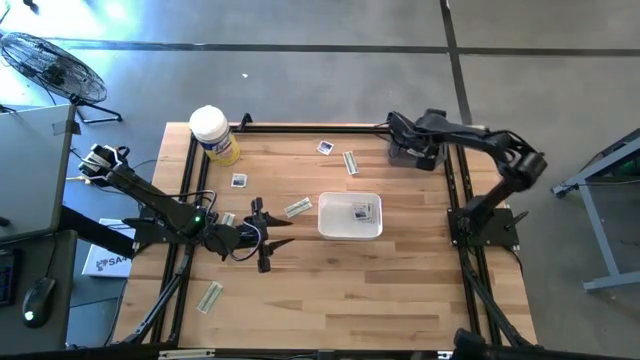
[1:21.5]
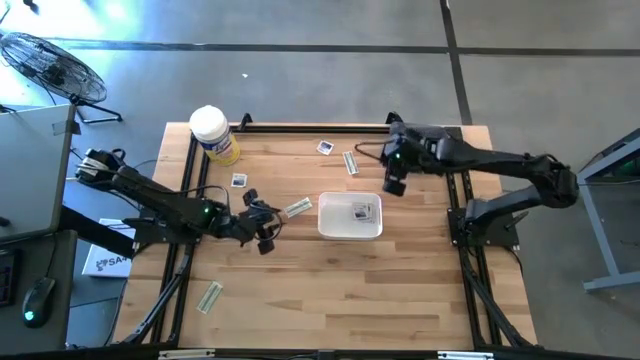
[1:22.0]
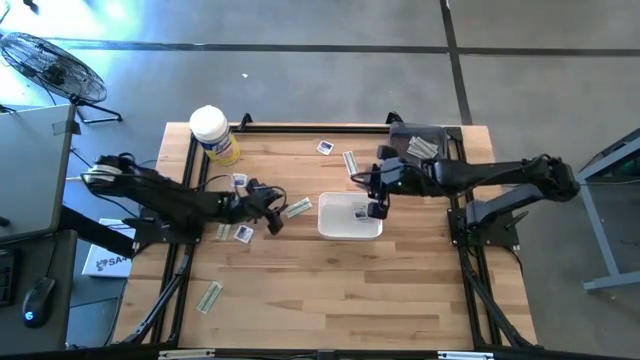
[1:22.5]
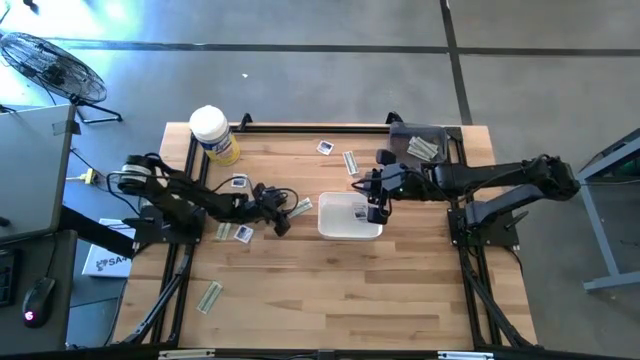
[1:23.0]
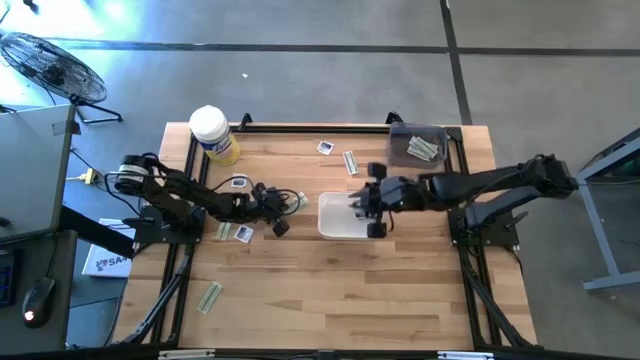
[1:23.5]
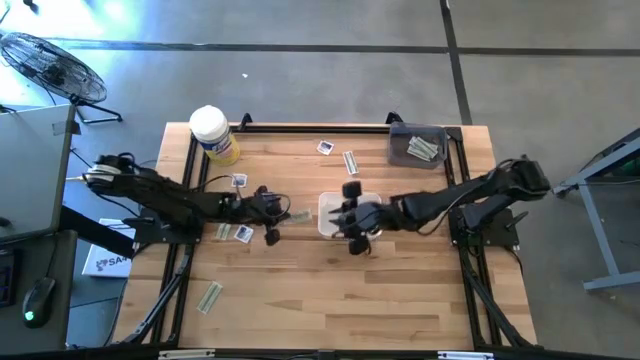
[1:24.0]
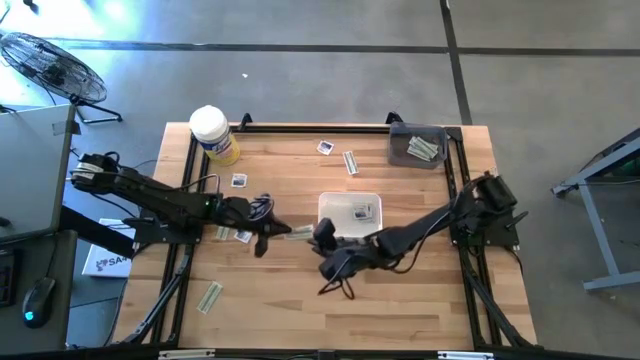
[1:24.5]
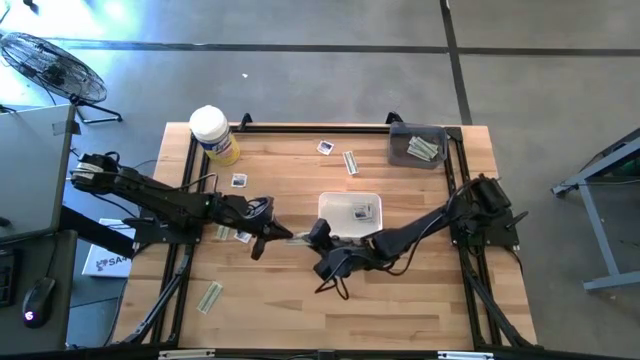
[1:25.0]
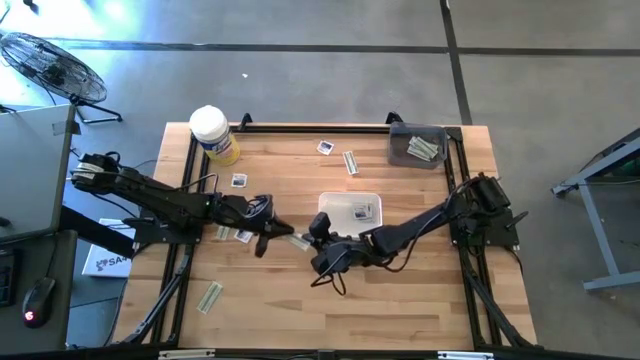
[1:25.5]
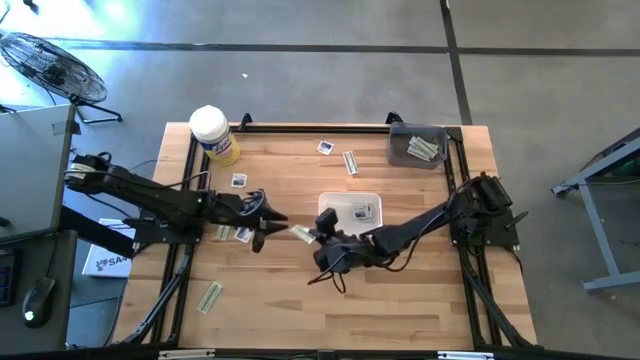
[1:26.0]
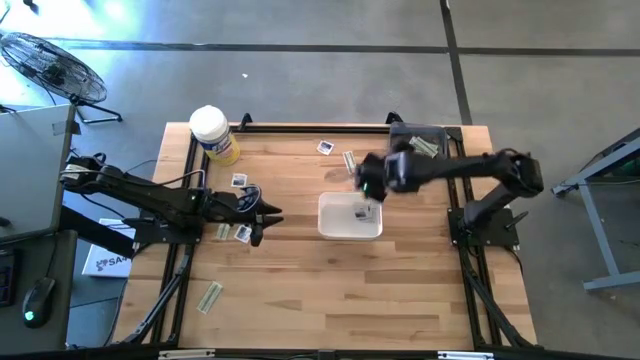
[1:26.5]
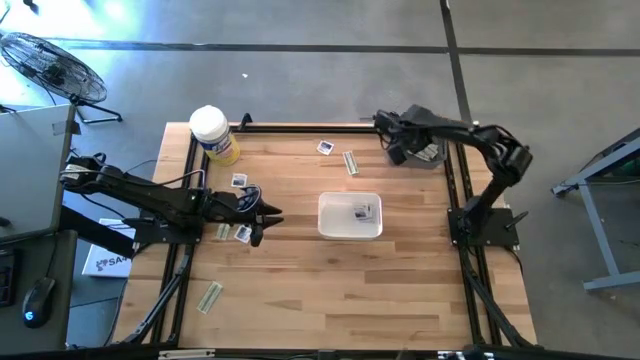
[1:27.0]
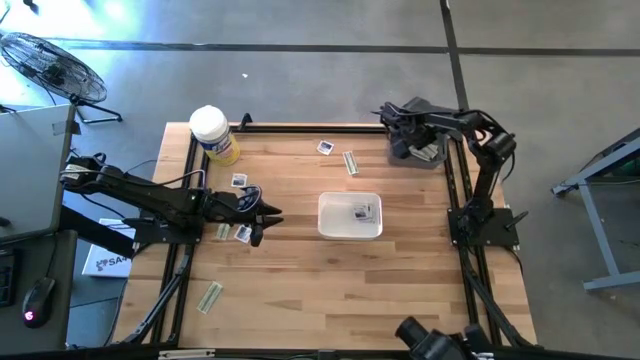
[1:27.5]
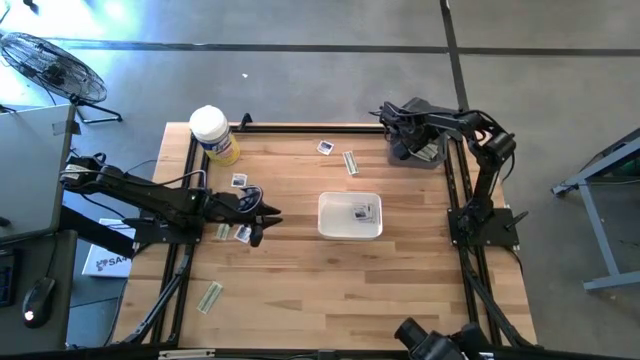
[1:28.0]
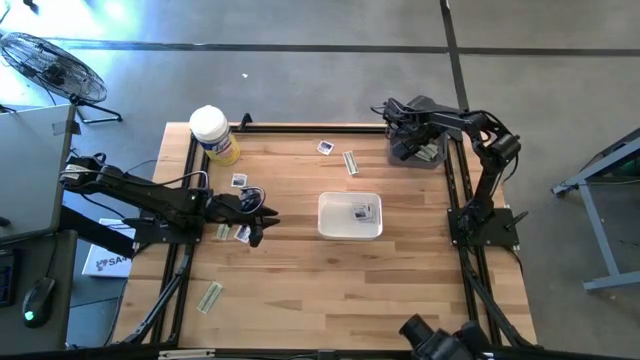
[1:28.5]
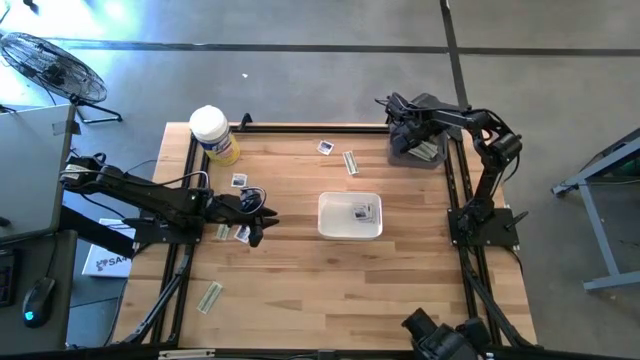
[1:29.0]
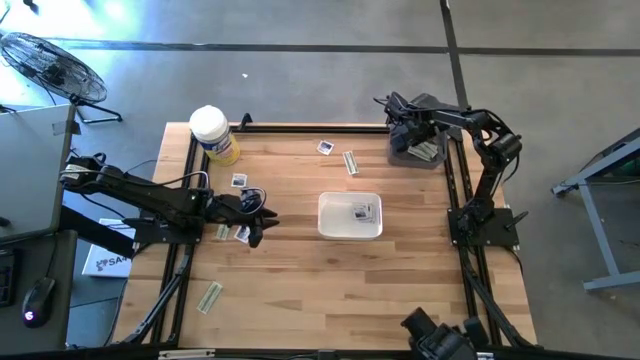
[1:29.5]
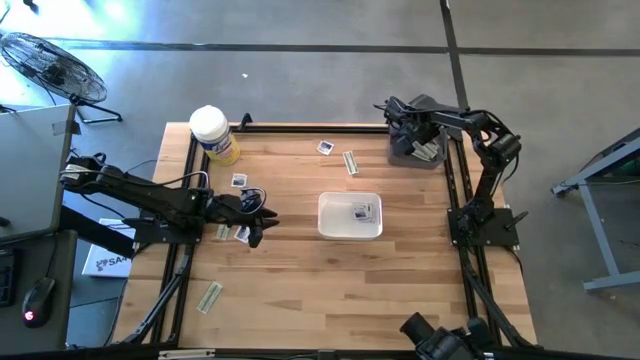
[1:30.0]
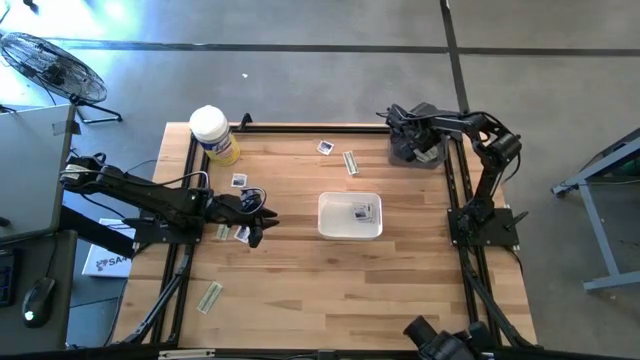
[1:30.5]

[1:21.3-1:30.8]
Task: Pick & Place First Aid Supplies
Put the green bandage into the black bin

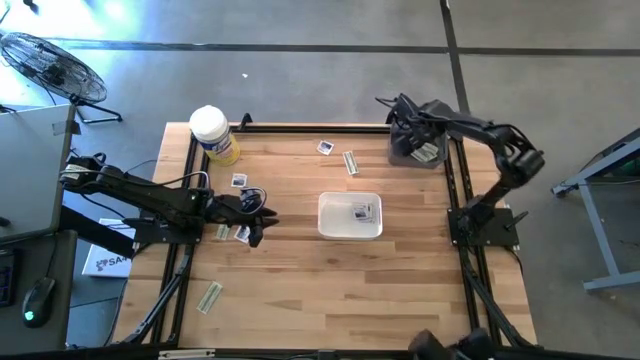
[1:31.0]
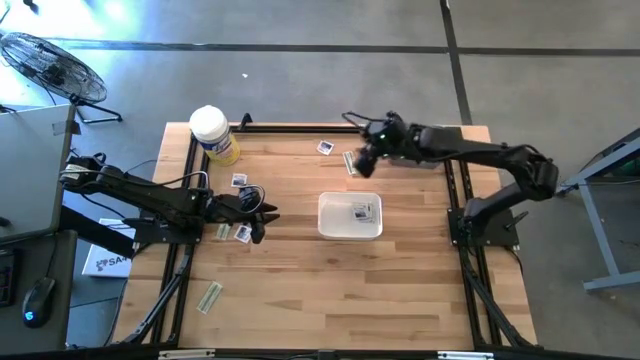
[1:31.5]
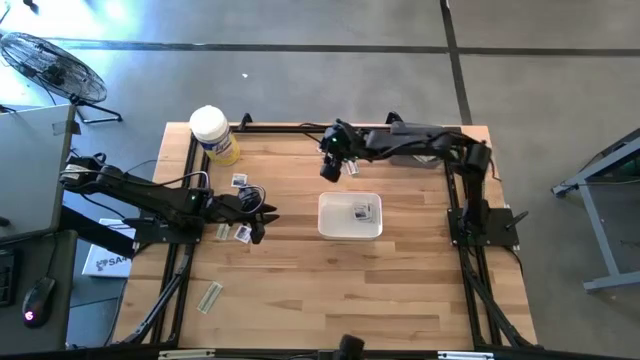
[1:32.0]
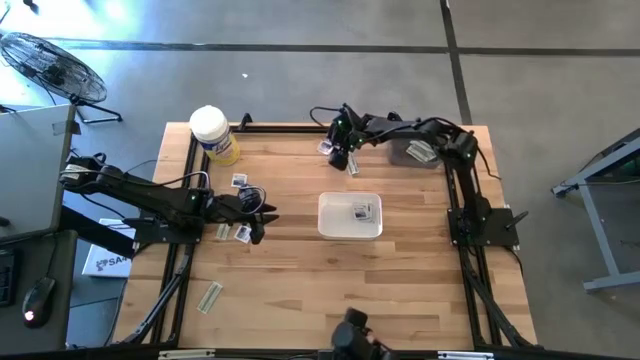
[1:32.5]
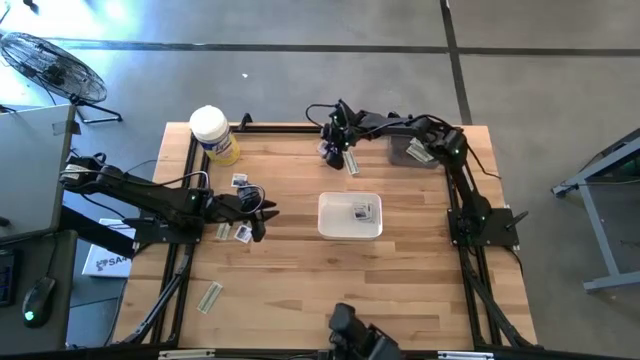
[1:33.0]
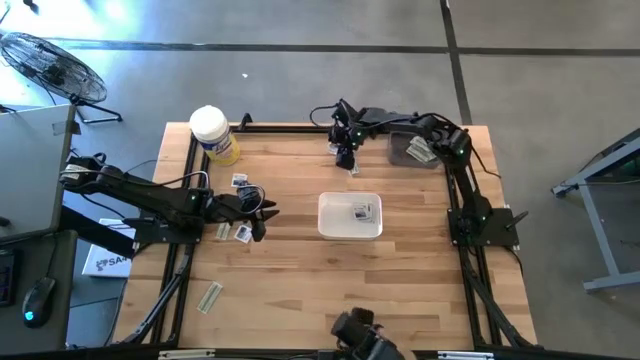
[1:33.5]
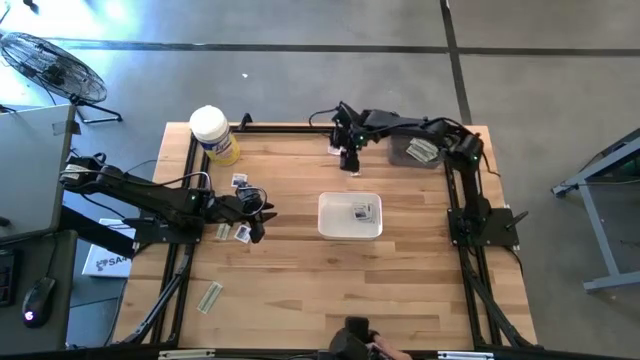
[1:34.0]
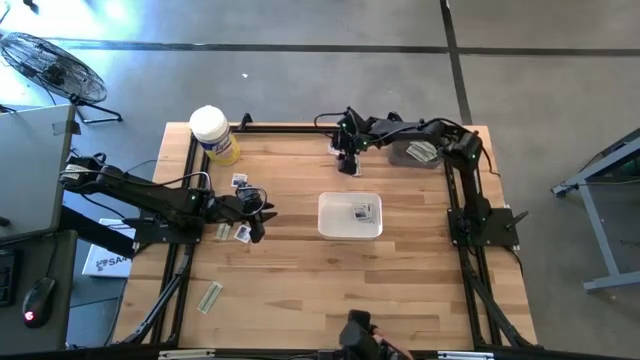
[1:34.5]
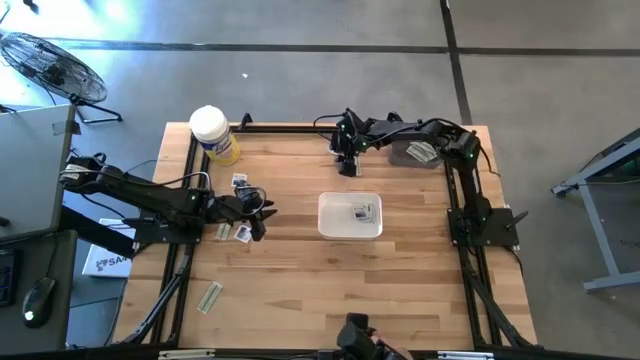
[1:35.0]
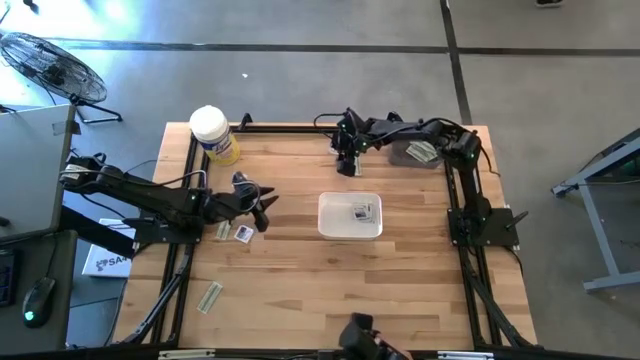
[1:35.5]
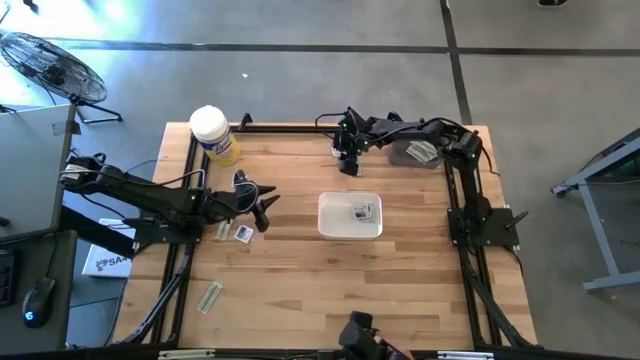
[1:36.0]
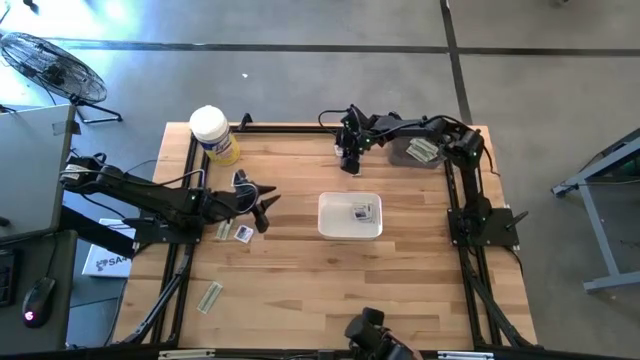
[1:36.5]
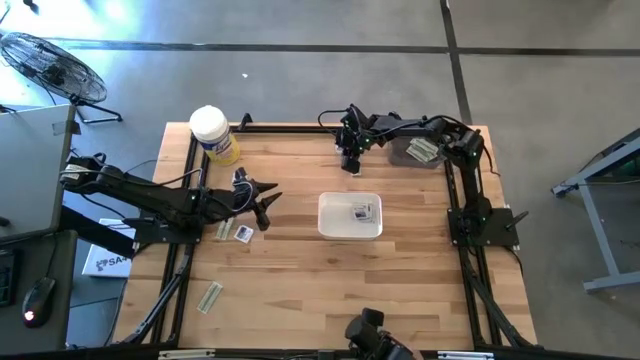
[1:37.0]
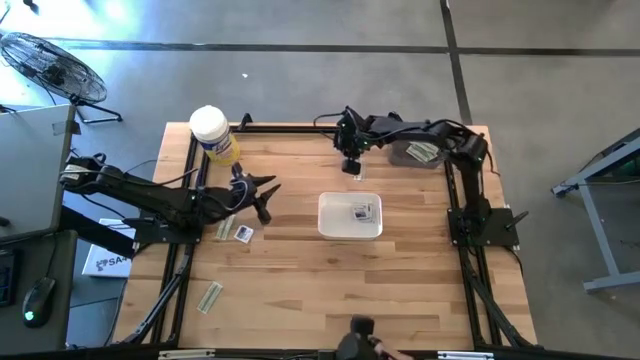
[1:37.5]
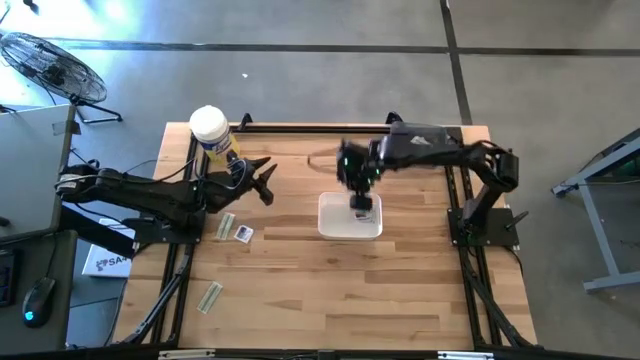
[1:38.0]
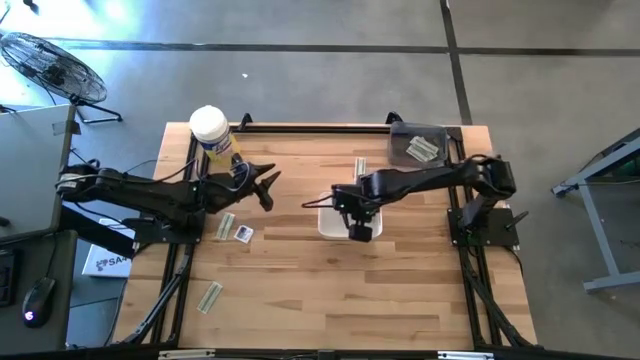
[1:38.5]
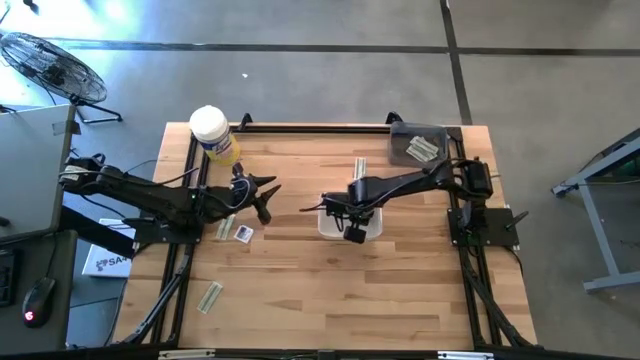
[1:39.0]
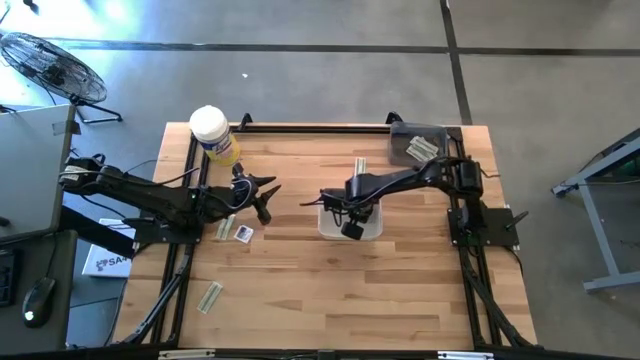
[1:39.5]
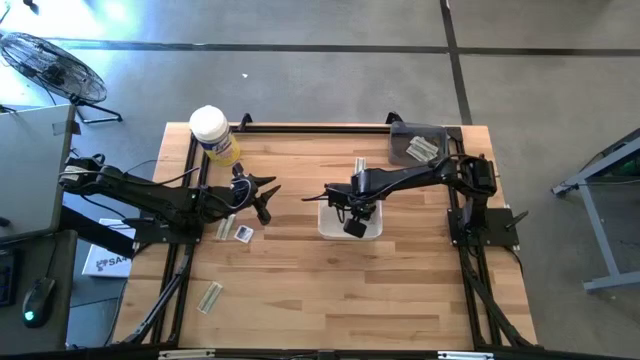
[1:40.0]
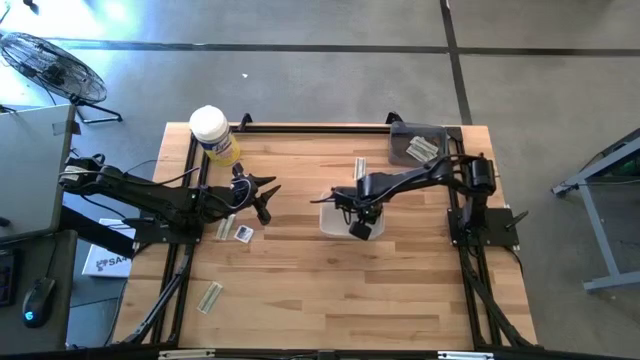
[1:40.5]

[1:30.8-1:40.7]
Put the blue alcohol pad into the white bin
